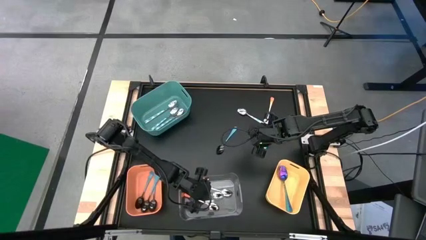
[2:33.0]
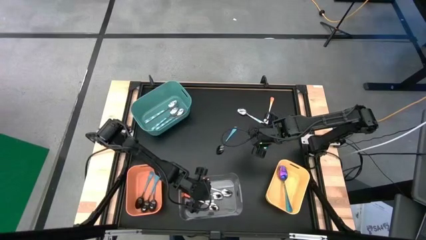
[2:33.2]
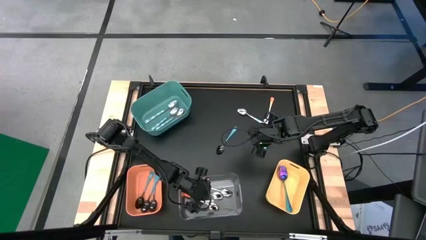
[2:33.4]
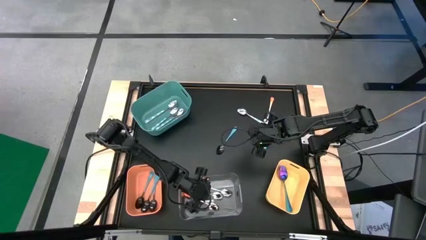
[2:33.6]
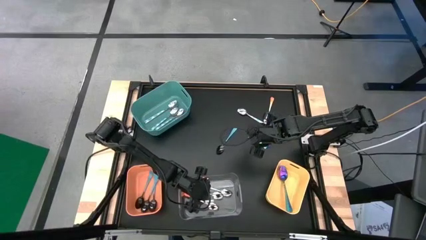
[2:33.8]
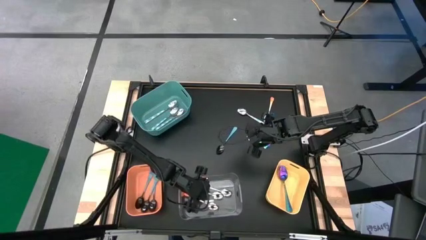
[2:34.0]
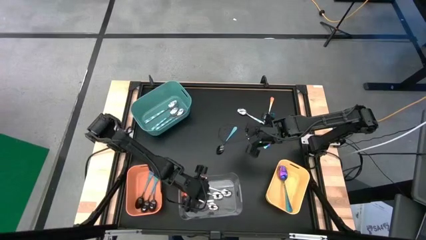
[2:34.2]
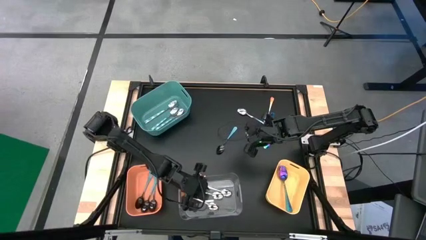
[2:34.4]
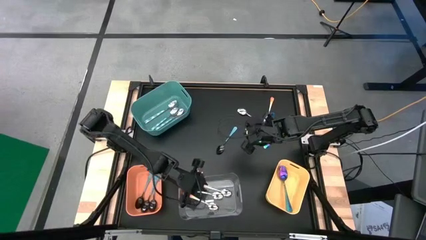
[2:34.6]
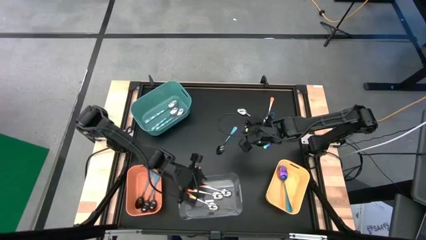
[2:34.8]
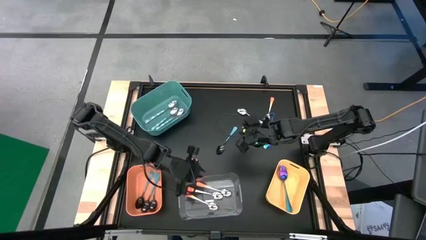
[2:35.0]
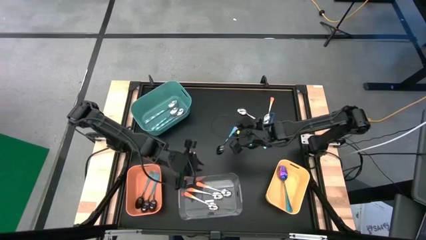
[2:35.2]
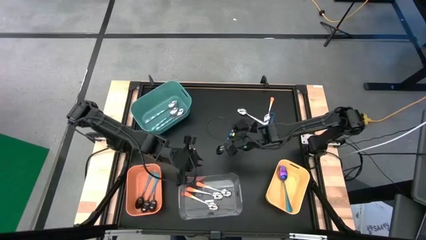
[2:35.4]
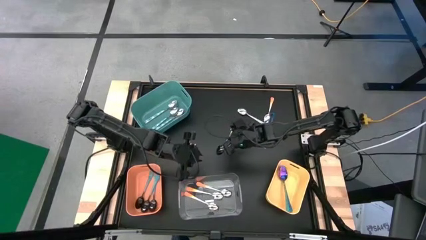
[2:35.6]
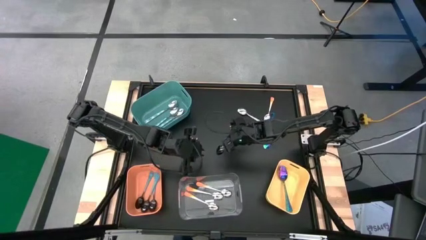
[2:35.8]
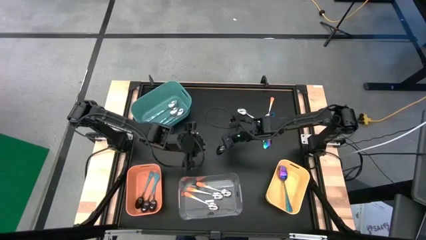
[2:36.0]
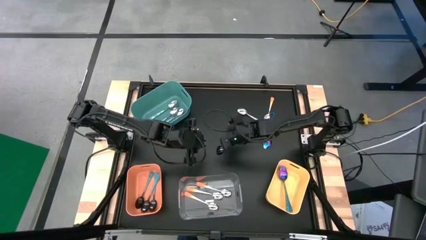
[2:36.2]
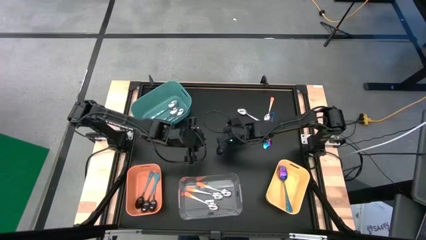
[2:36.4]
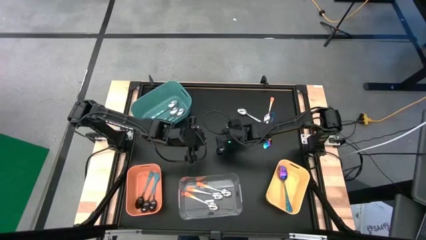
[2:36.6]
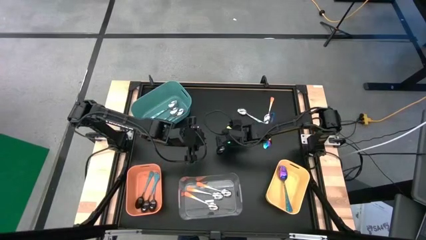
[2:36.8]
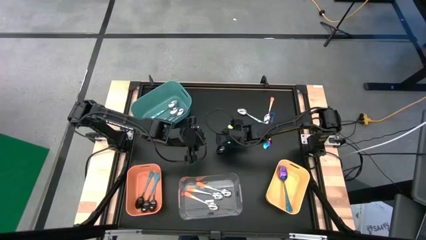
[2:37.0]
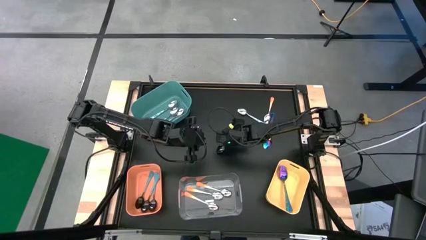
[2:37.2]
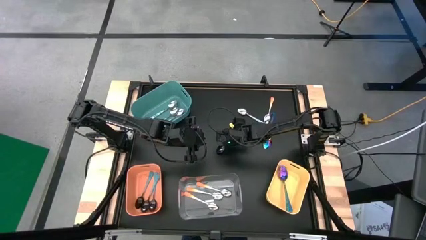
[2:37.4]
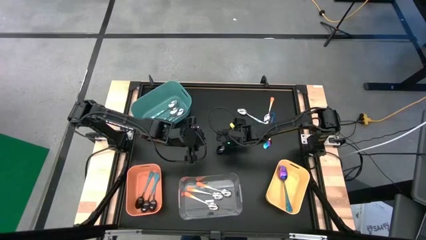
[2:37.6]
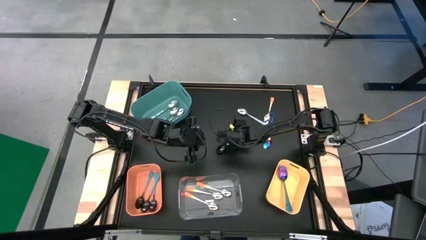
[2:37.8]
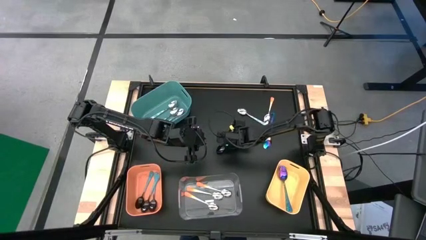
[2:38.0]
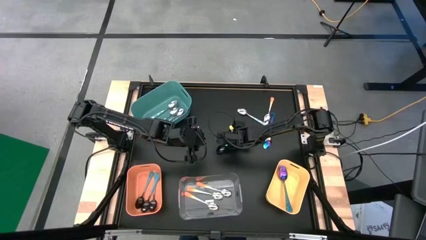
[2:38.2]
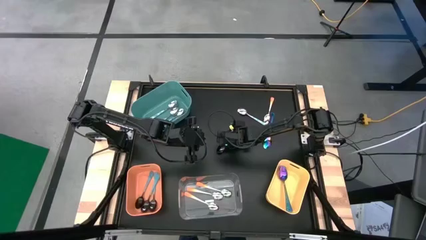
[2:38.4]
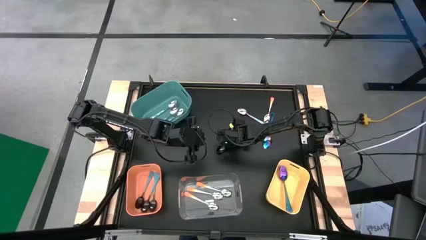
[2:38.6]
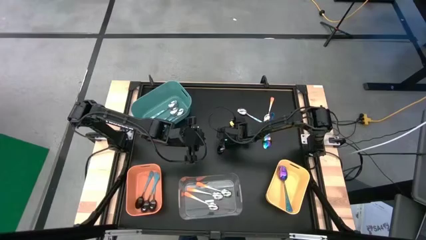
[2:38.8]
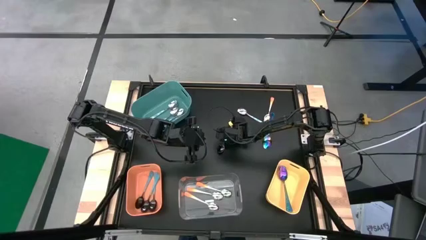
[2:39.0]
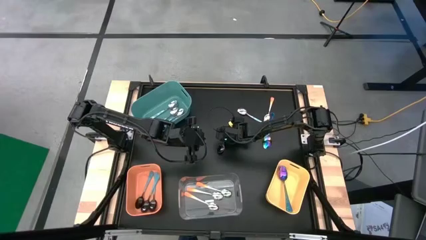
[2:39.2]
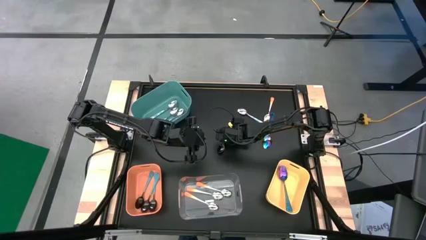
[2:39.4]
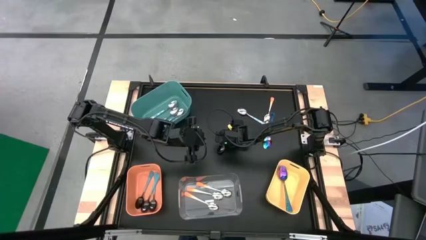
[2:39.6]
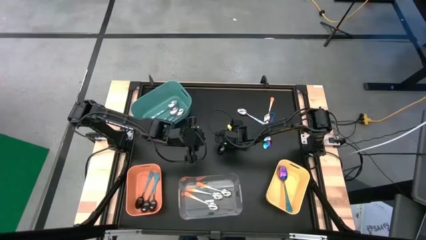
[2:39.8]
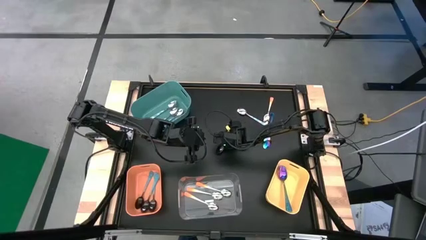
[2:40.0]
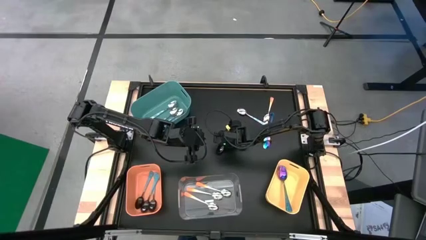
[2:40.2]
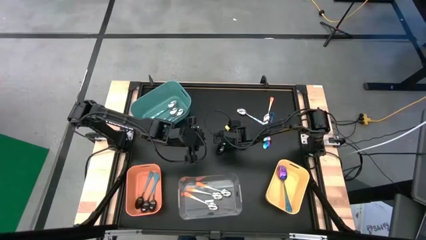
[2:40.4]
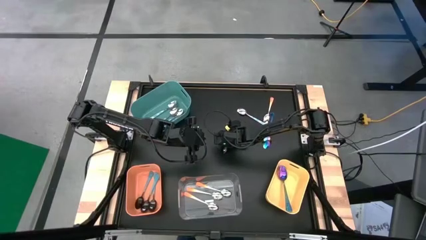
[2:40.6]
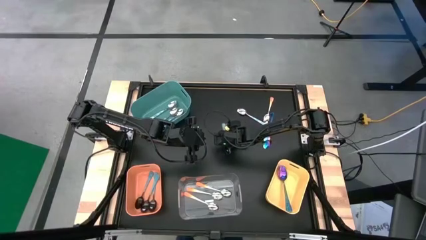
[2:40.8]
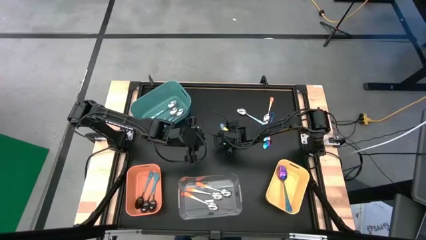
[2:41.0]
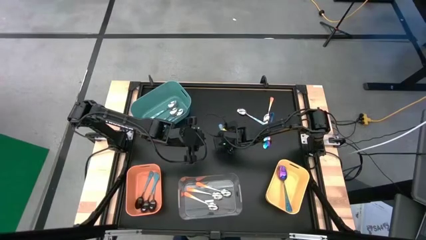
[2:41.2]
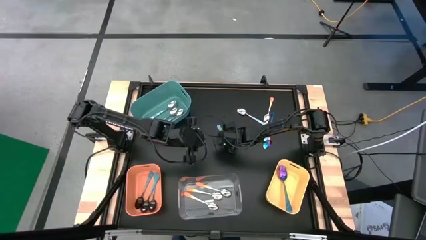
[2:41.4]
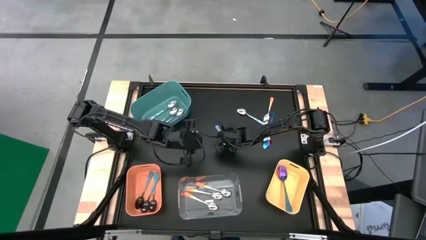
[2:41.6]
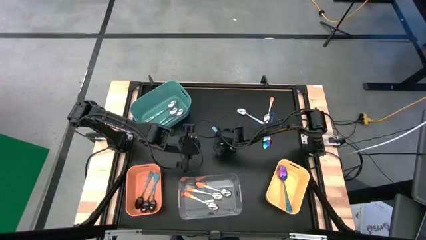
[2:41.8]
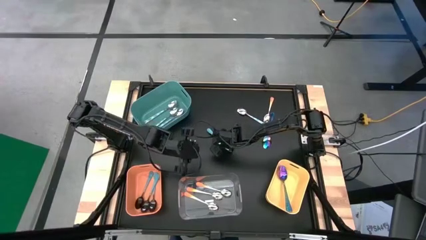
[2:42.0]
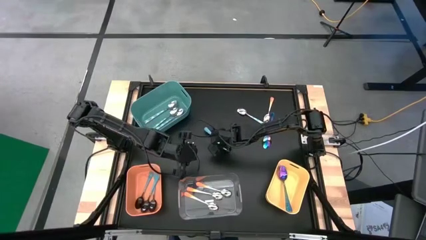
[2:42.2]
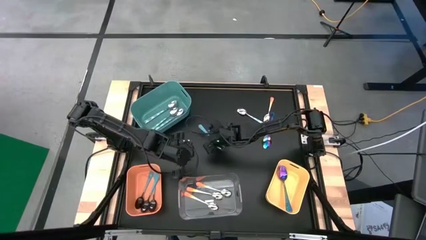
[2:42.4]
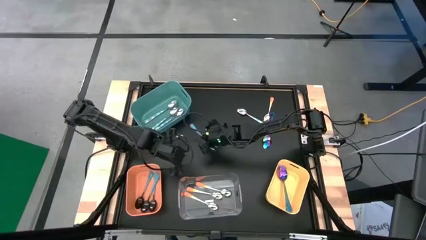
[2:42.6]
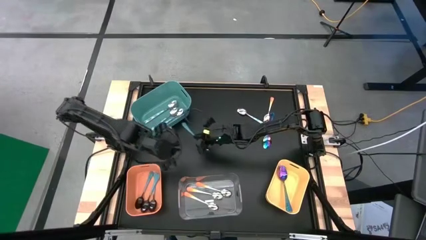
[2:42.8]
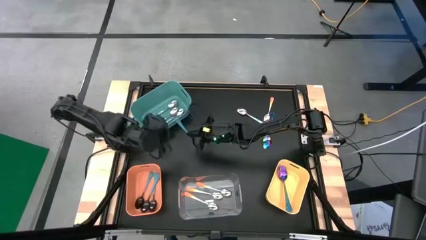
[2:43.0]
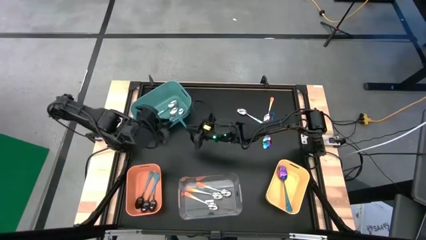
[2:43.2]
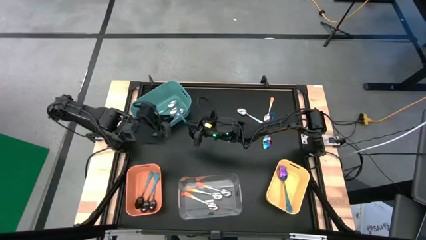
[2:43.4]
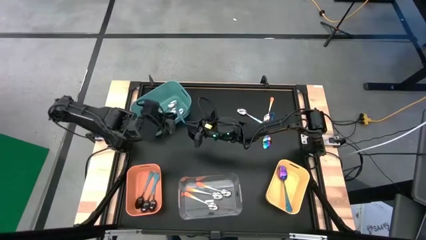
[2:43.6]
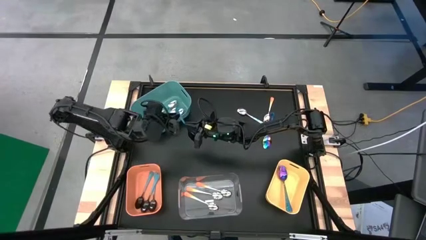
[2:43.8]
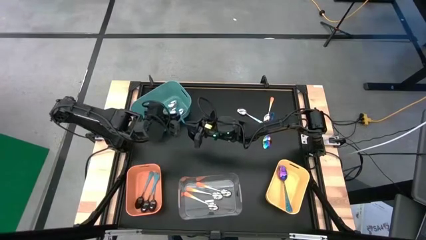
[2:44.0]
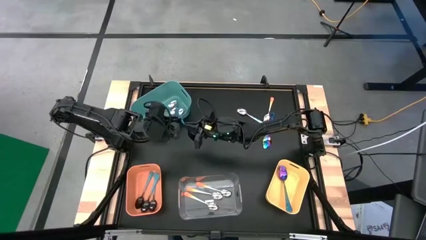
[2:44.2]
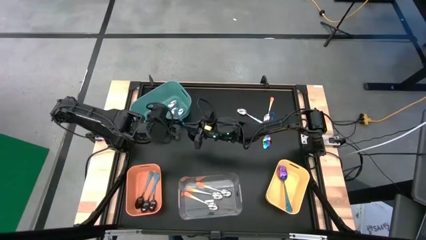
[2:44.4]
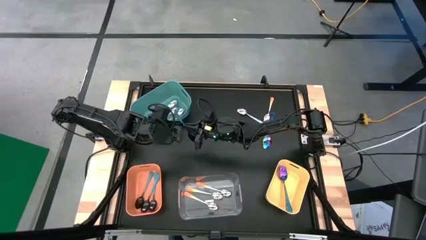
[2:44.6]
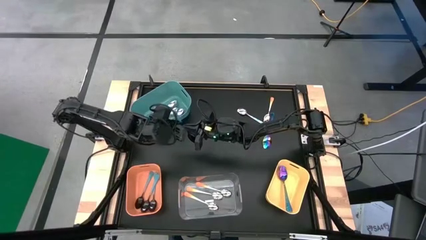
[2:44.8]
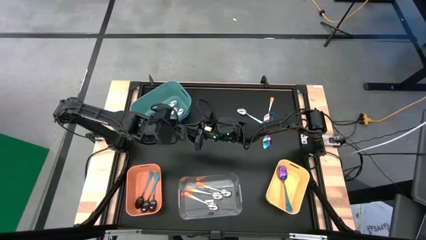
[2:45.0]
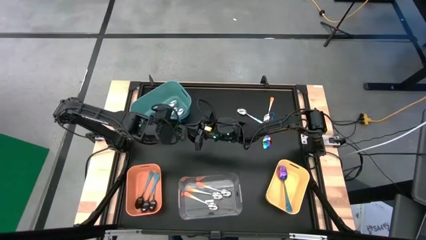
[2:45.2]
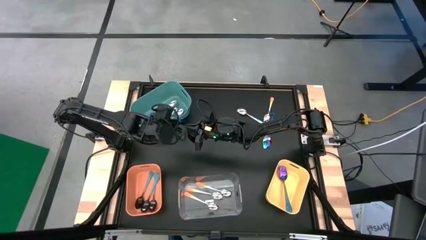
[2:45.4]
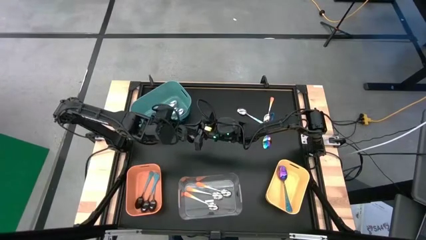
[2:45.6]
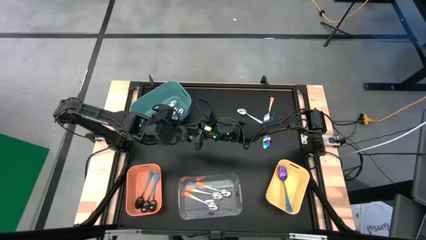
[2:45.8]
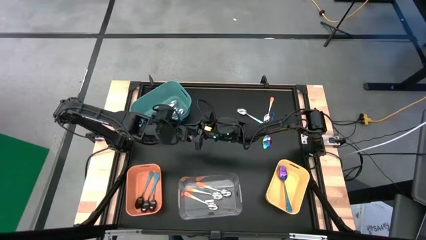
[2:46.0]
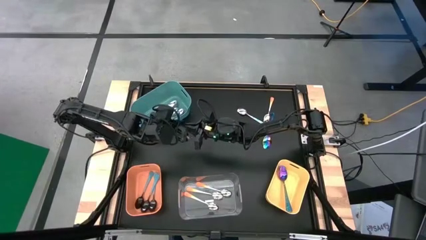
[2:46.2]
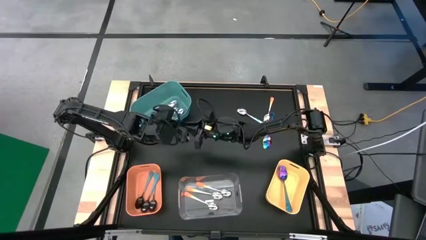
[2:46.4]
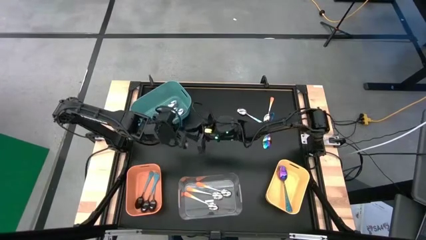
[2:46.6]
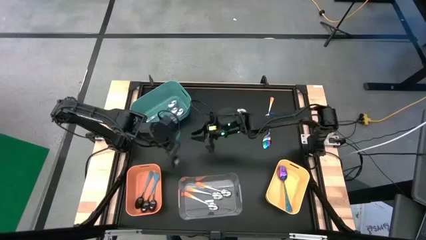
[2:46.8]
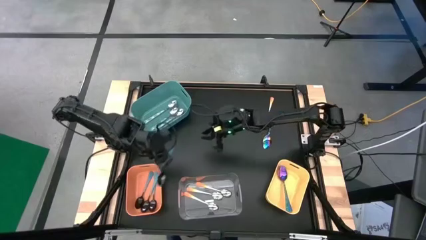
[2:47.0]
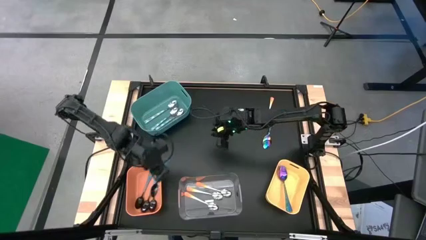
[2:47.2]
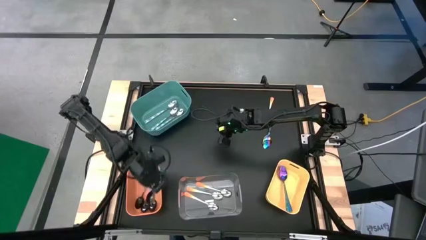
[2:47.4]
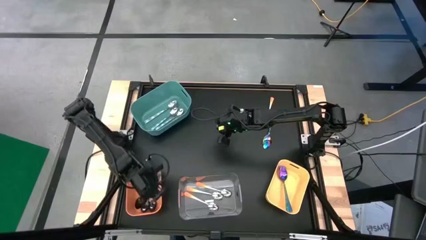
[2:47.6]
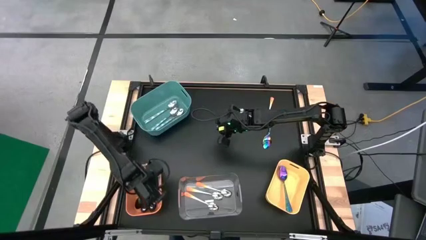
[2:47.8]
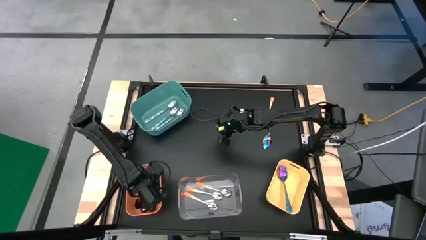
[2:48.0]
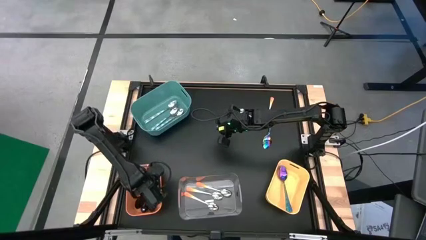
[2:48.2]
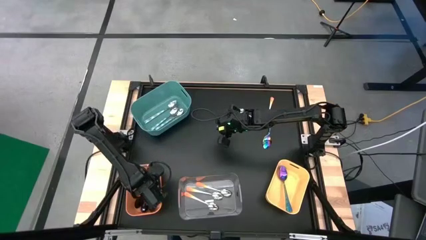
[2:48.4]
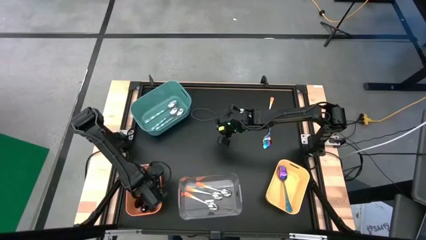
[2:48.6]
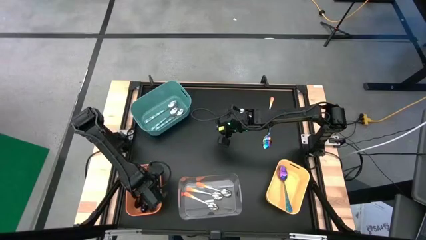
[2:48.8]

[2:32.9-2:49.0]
Task: Sort silverware by color (type)
Put the blue spoon into the orange bin
